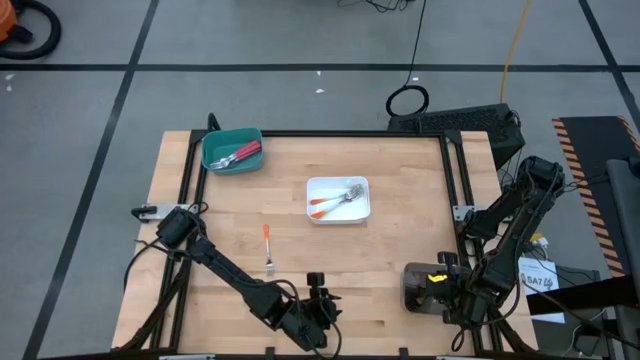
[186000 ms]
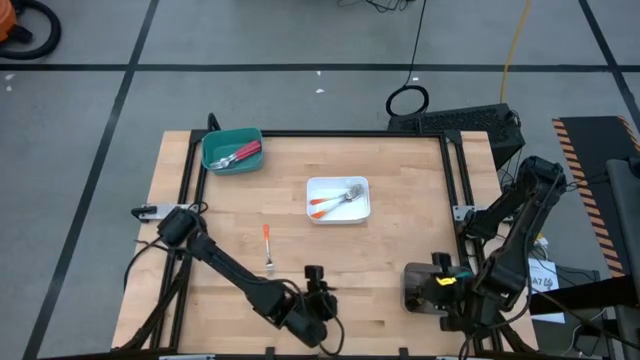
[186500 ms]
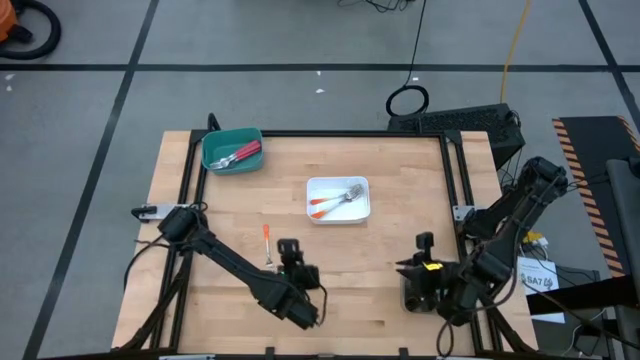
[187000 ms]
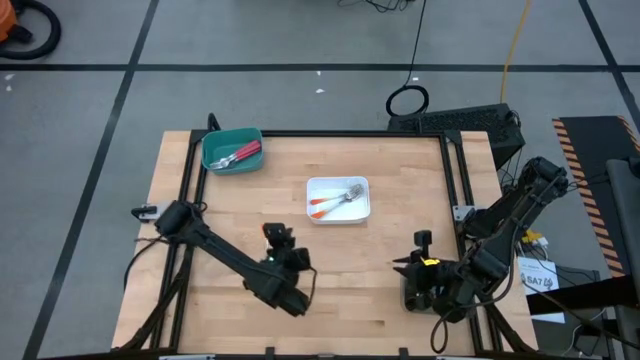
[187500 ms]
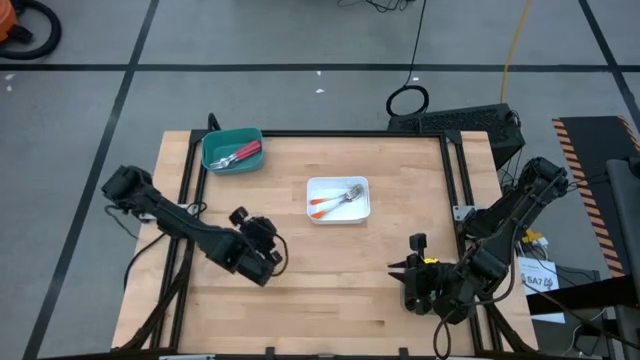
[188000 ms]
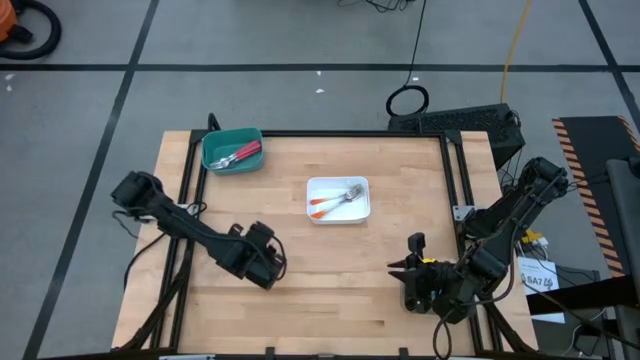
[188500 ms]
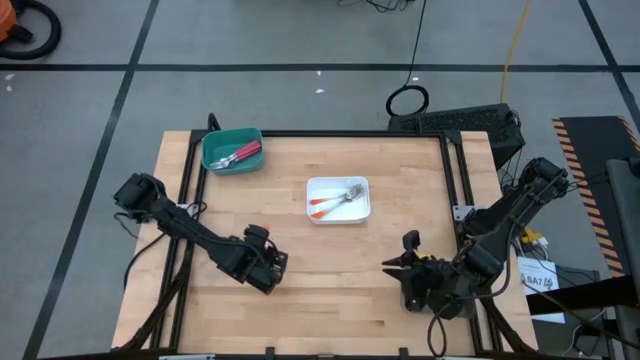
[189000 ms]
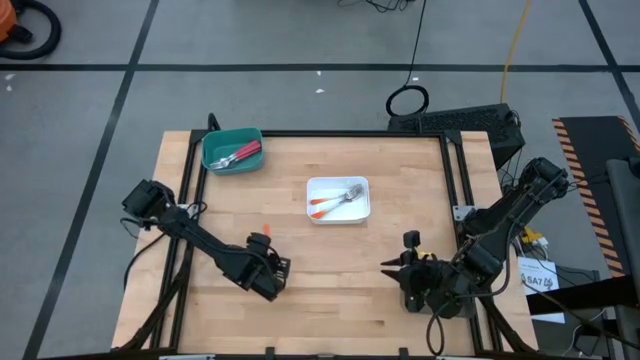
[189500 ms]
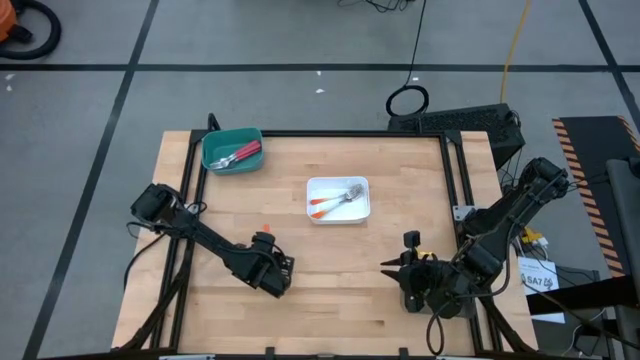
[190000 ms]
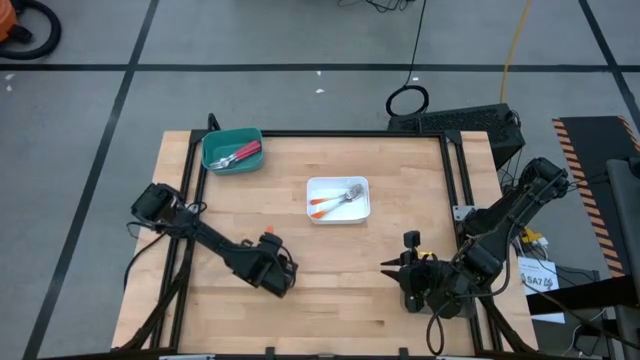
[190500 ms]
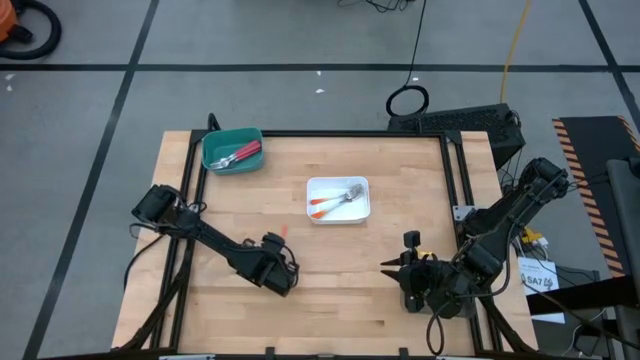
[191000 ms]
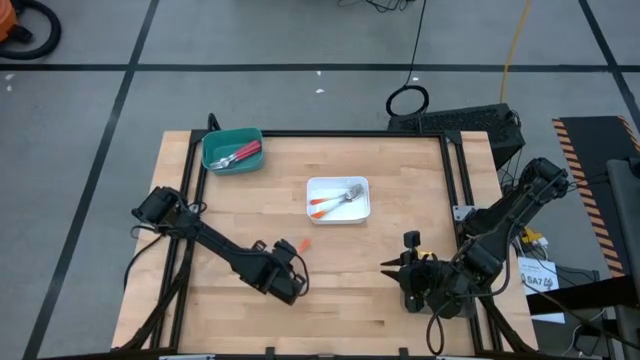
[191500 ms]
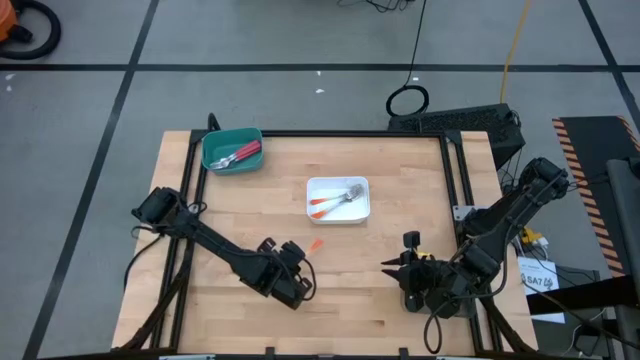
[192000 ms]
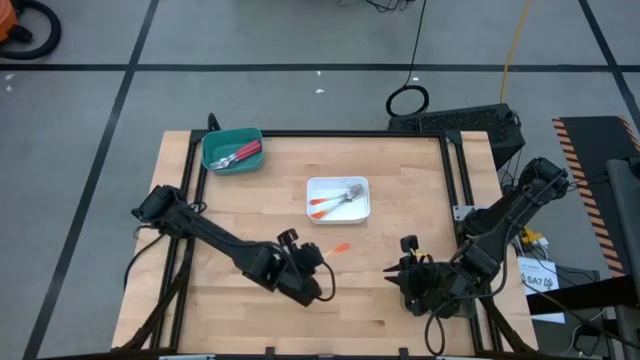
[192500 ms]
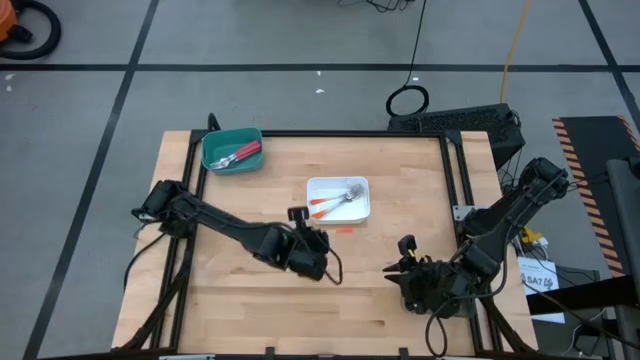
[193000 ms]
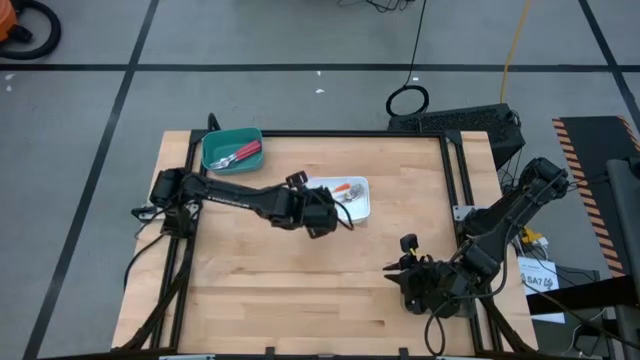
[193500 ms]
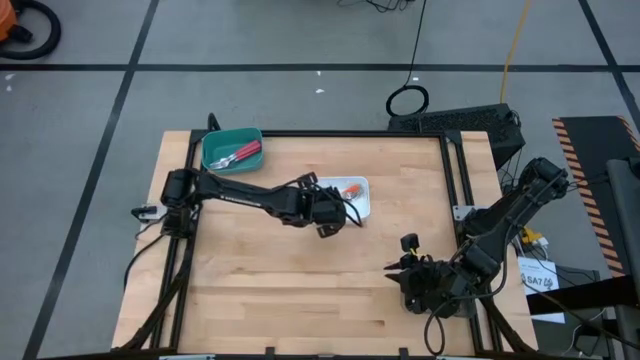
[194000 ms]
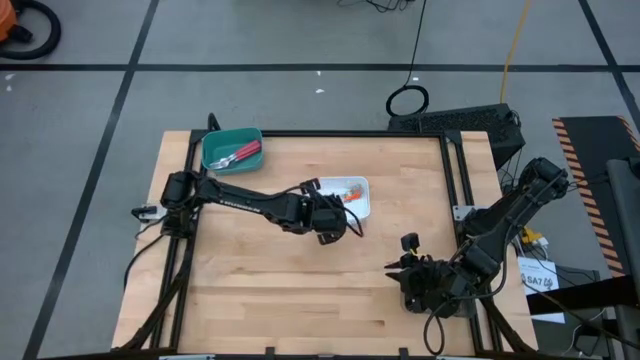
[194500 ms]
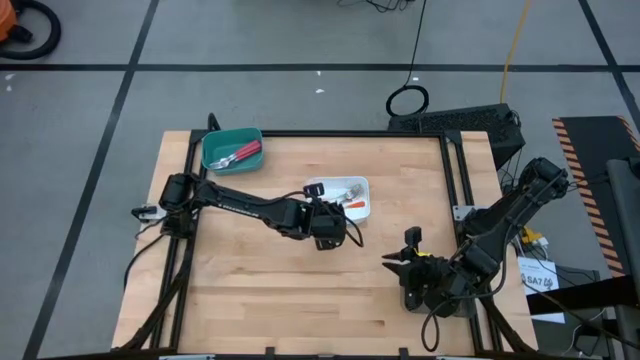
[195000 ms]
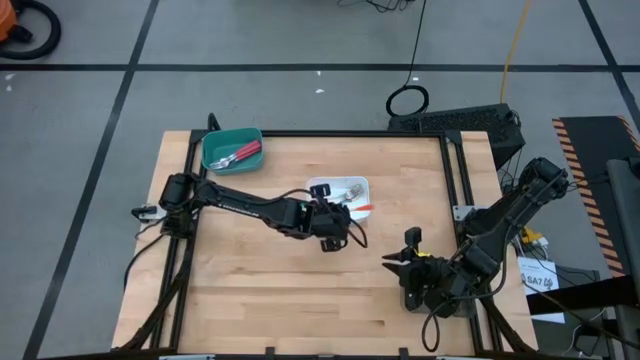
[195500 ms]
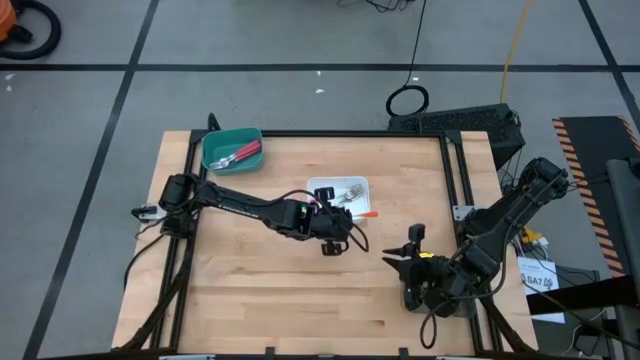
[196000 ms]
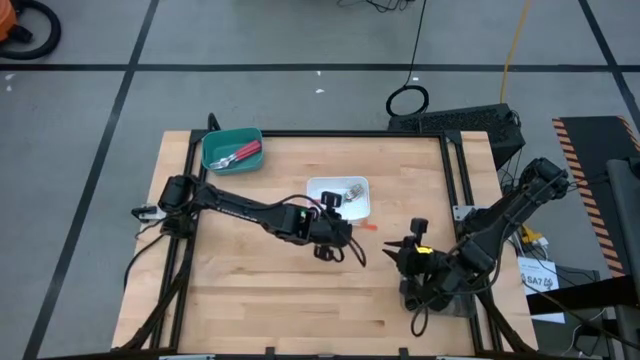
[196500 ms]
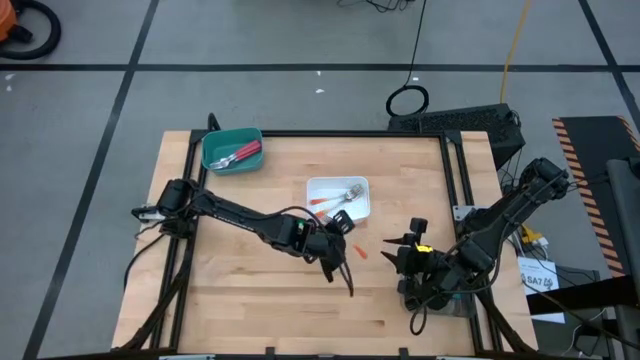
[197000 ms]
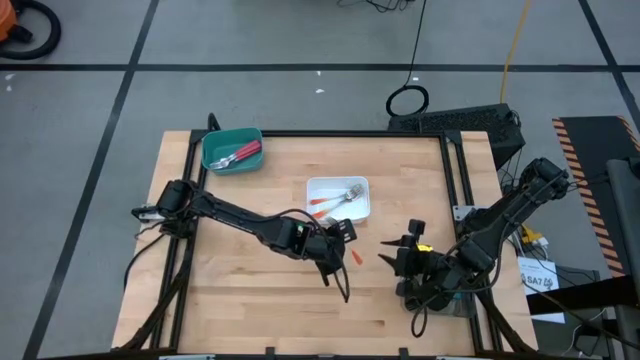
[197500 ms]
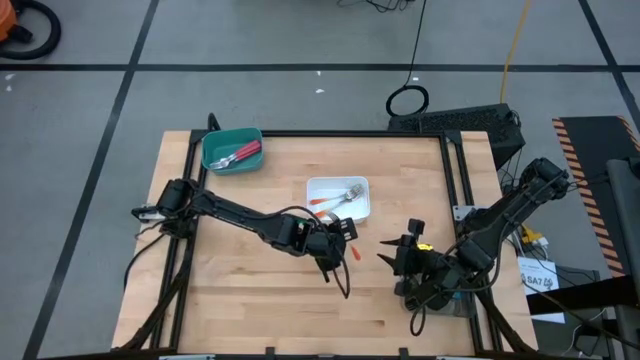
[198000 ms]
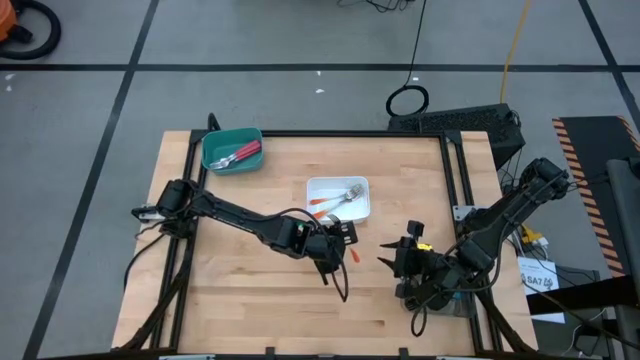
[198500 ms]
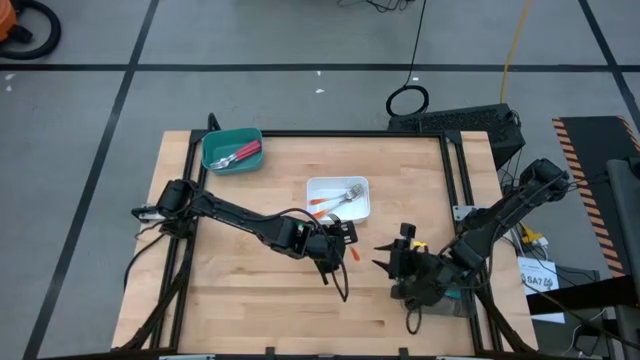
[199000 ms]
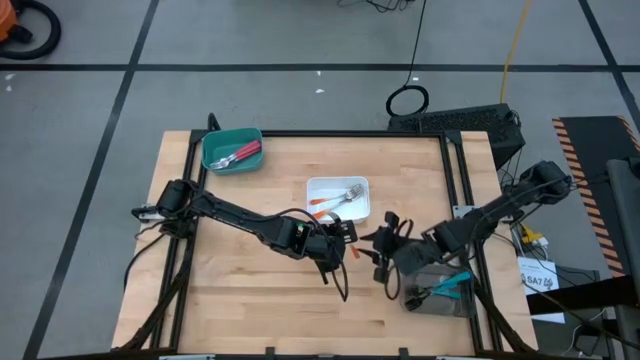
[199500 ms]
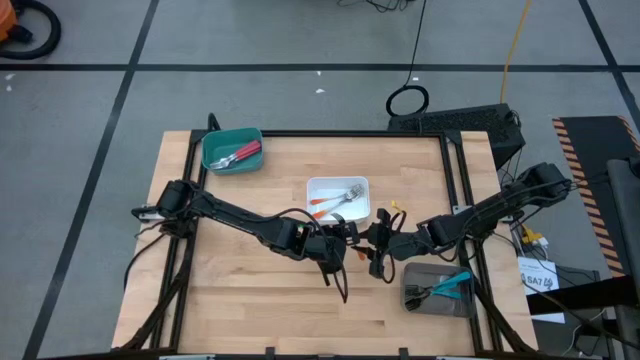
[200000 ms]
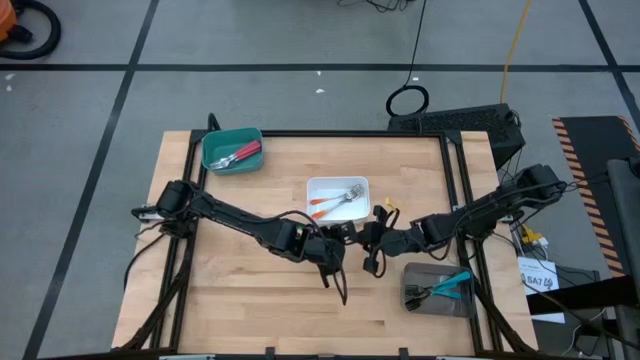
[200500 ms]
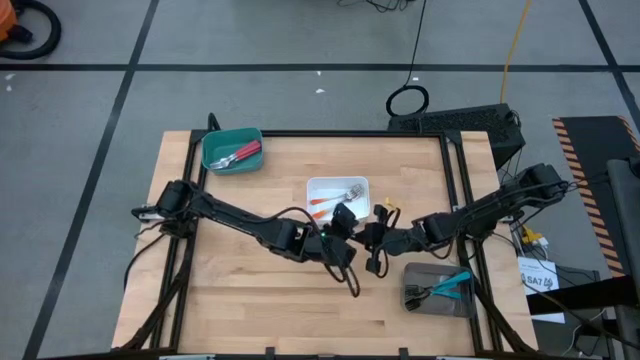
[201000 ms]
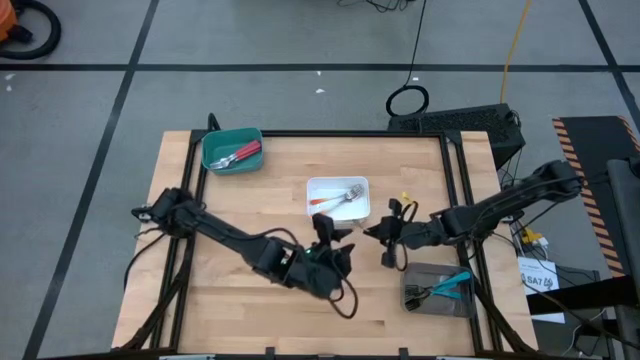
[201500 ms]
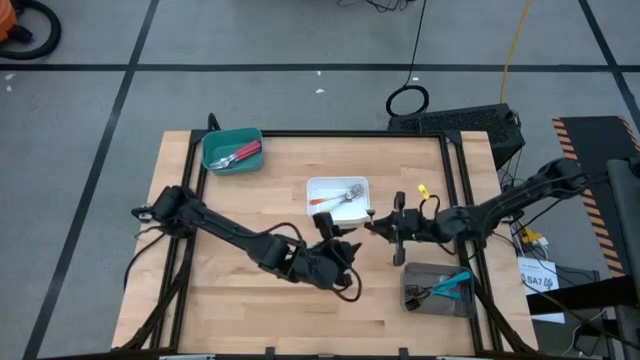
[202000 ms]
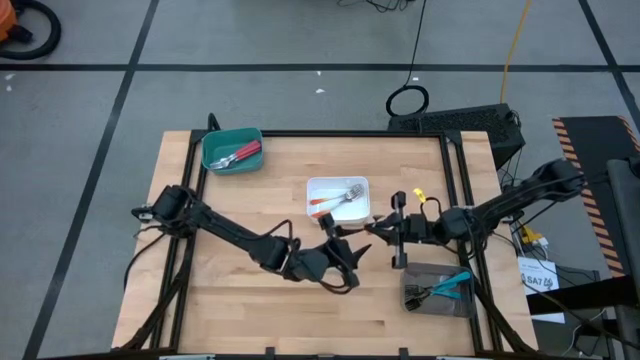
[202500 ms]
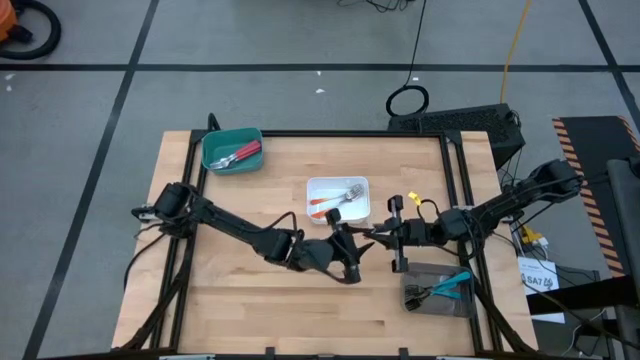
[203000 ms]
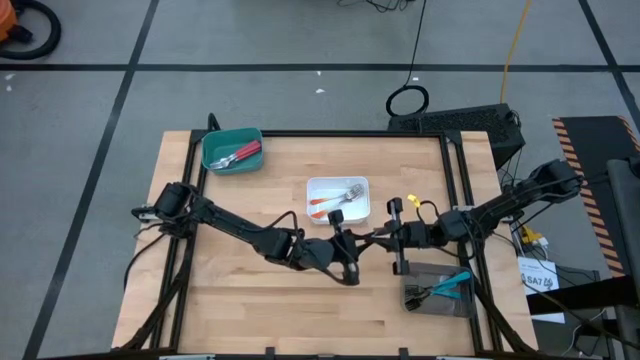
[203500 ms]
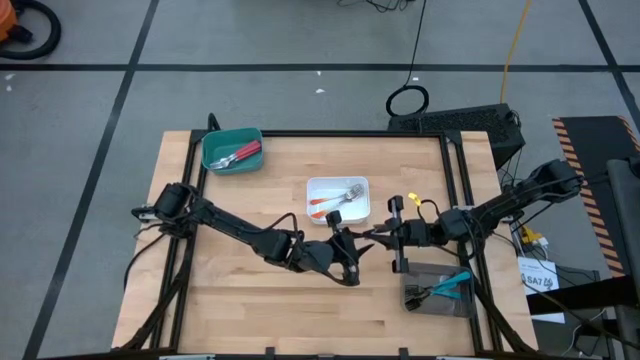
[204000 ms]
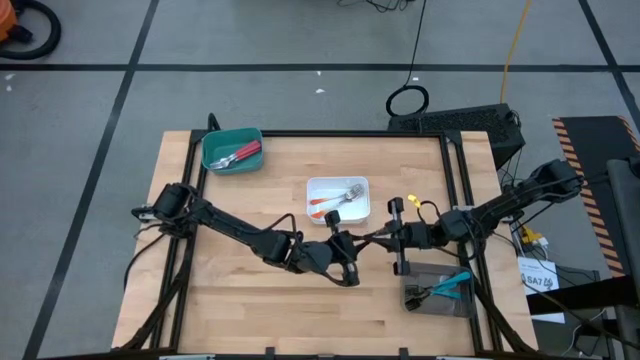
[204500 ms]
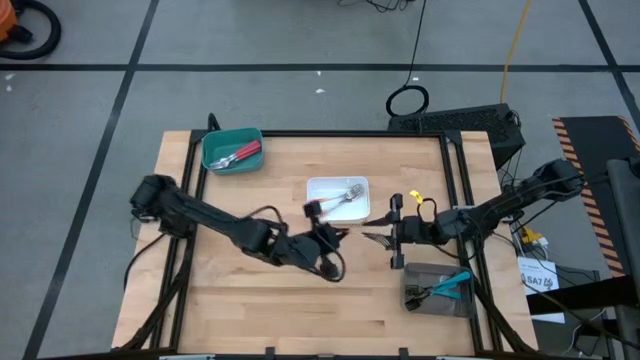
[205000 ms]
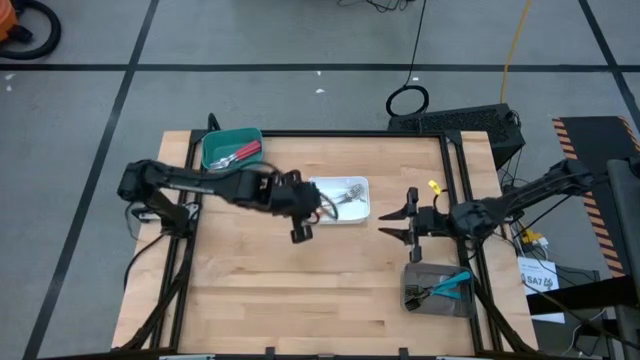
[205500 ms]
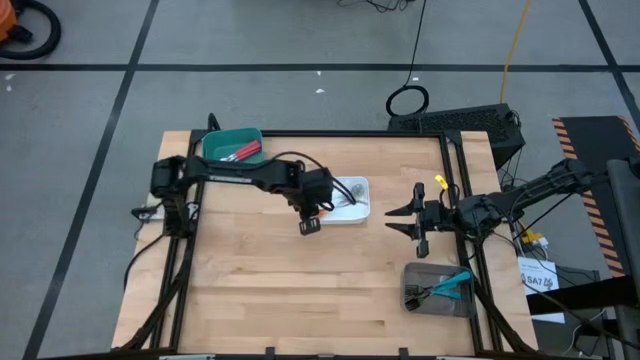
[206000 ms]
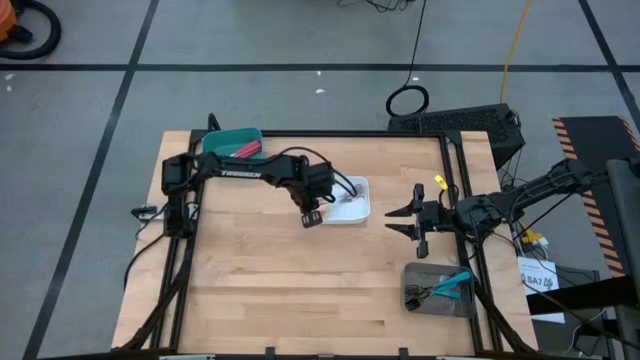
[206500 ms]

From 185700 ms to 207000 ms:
Task: Sort silverware by color (type)
Put the orange fork into the white bin

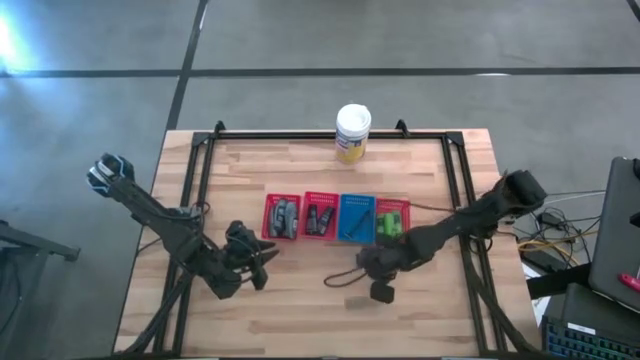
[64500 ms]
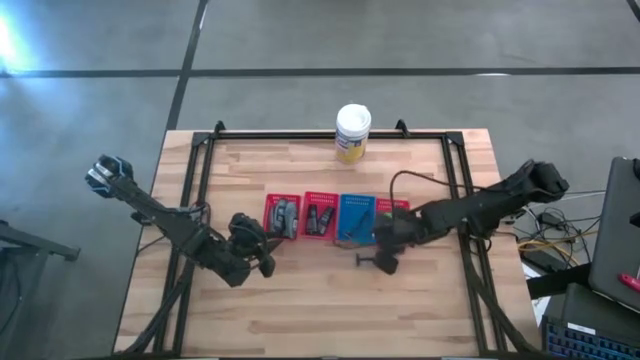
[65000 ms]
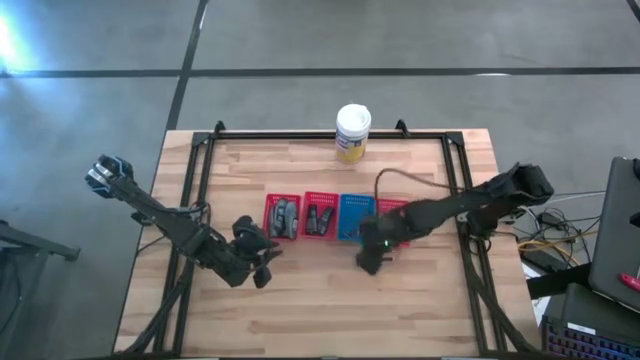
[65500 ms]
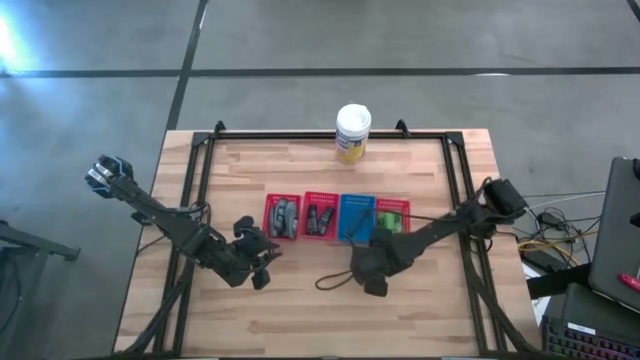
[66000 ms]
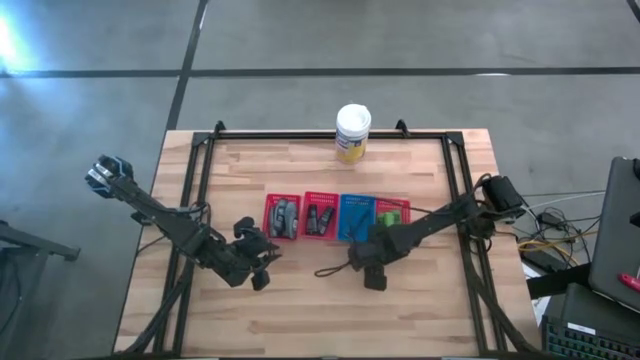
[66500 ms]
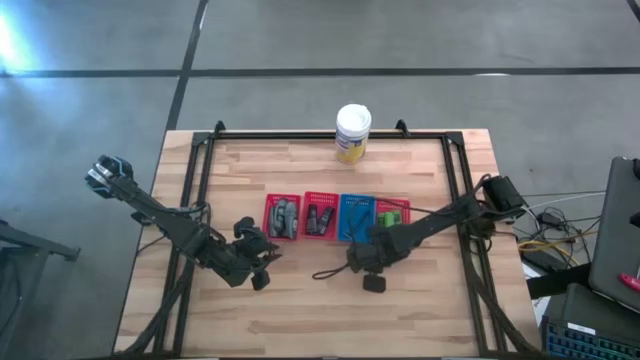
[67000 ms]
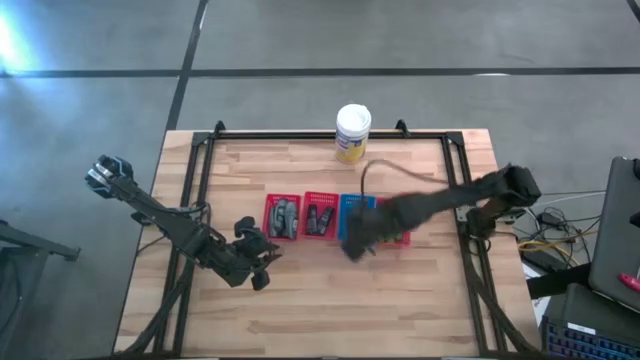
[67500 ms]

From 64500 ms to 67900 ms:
Task: Pick & Place Travel size toiletries
Put the blue razor into the blue bin
